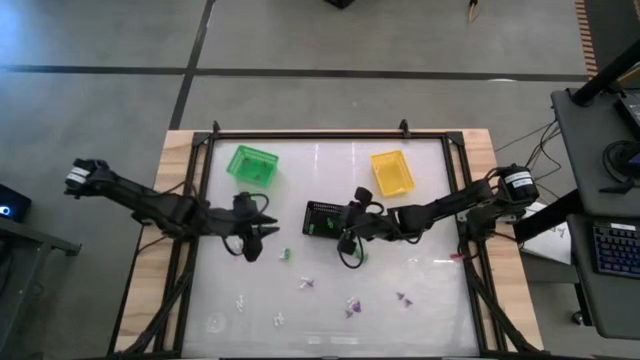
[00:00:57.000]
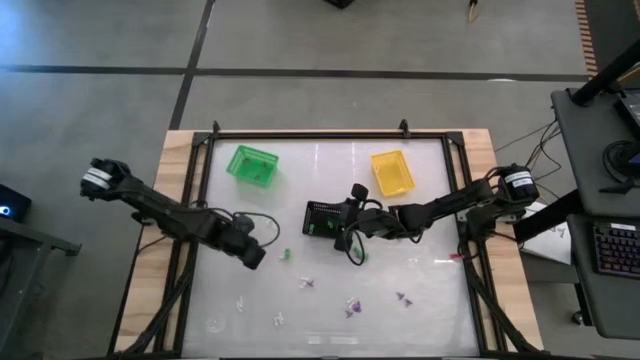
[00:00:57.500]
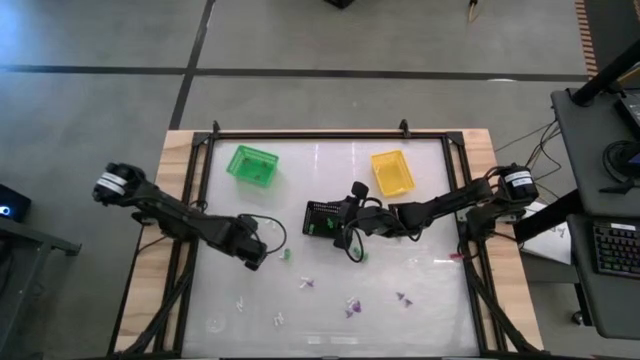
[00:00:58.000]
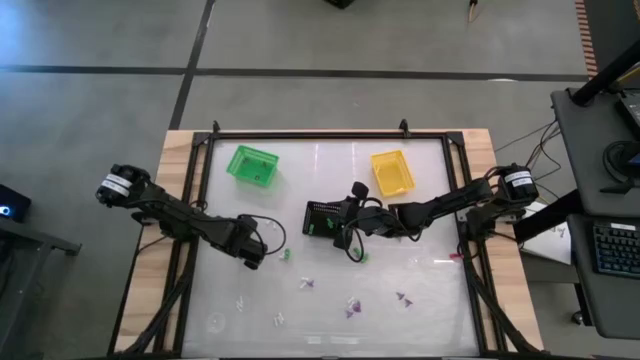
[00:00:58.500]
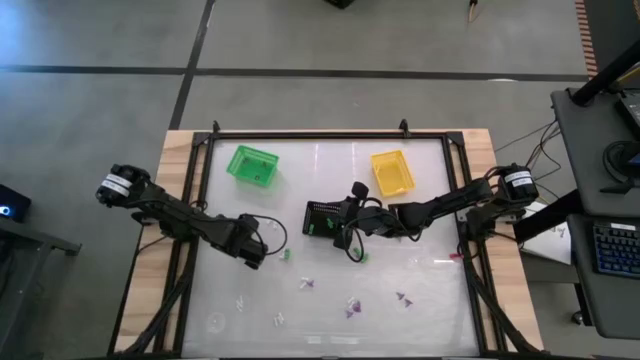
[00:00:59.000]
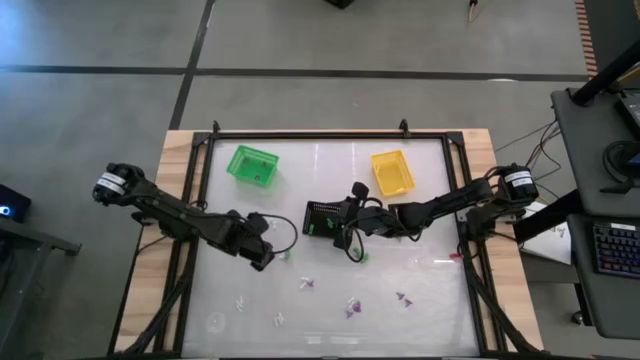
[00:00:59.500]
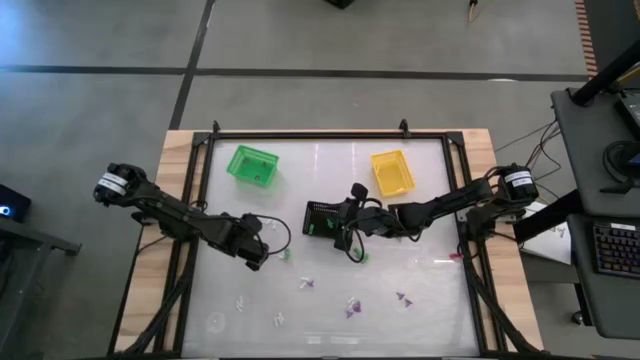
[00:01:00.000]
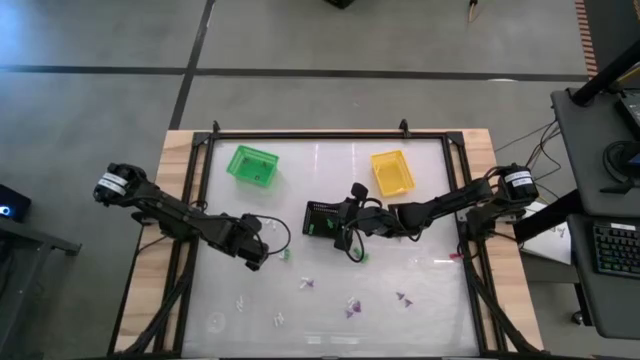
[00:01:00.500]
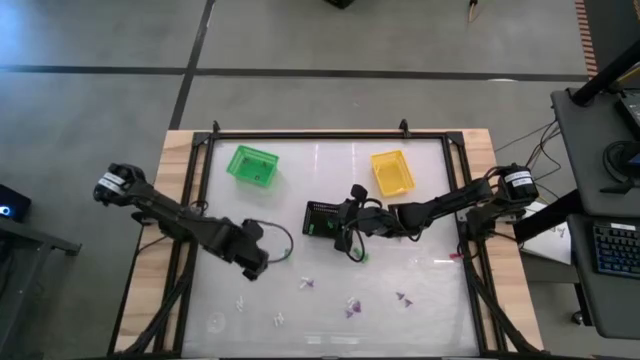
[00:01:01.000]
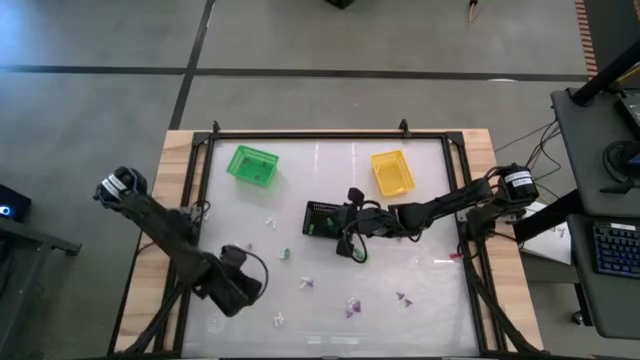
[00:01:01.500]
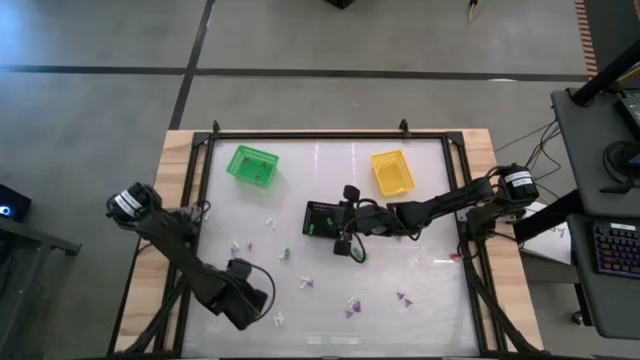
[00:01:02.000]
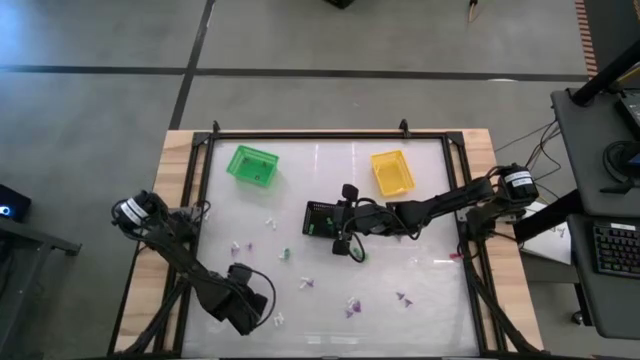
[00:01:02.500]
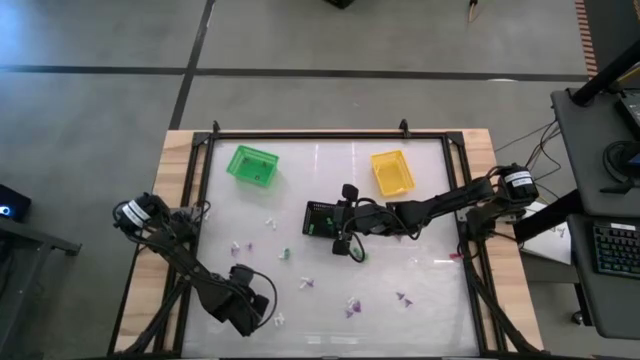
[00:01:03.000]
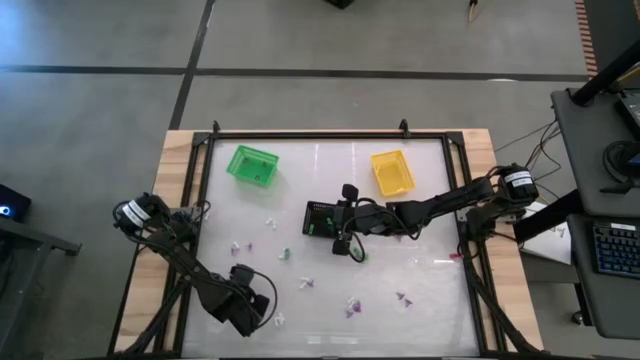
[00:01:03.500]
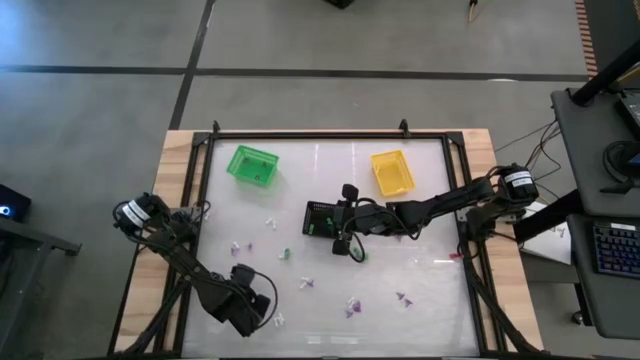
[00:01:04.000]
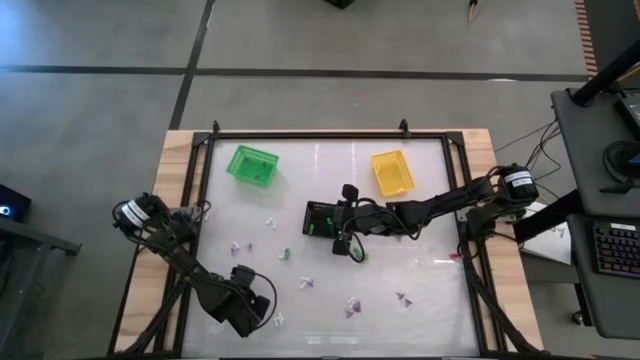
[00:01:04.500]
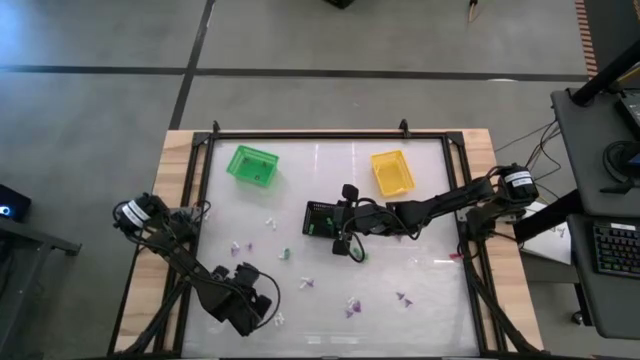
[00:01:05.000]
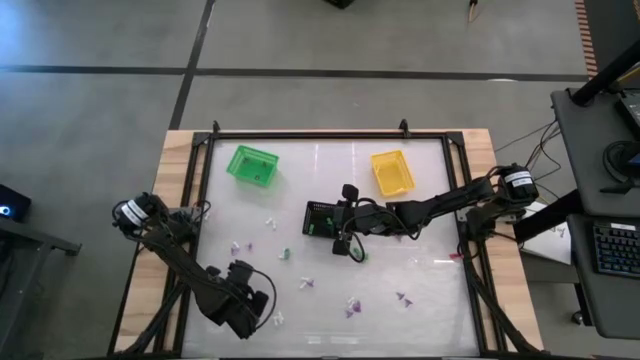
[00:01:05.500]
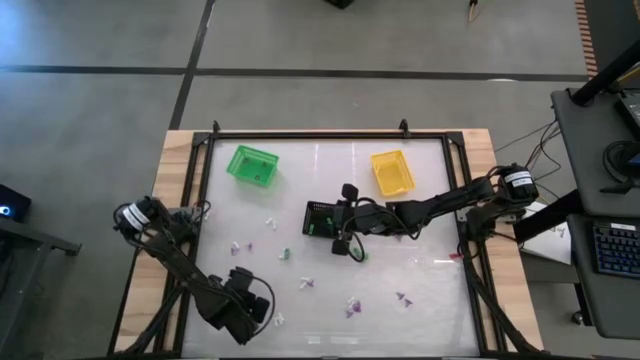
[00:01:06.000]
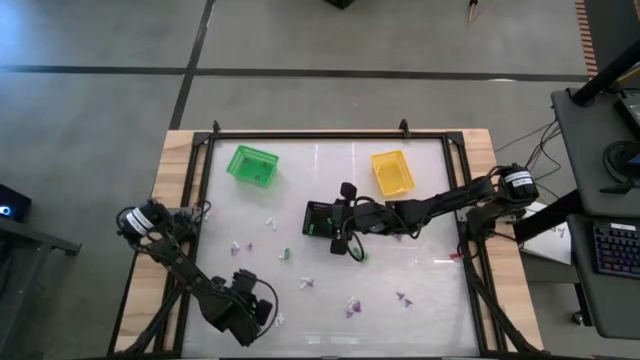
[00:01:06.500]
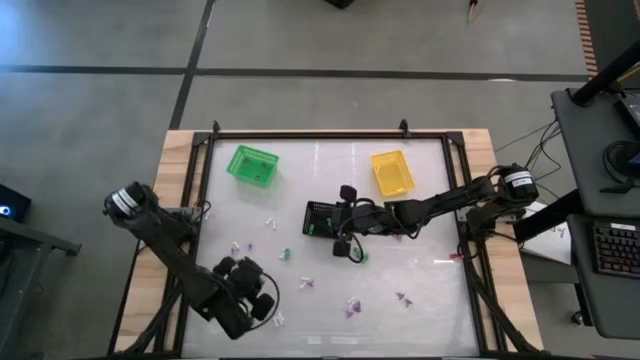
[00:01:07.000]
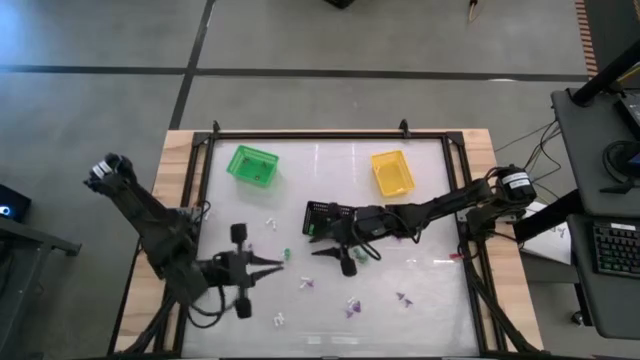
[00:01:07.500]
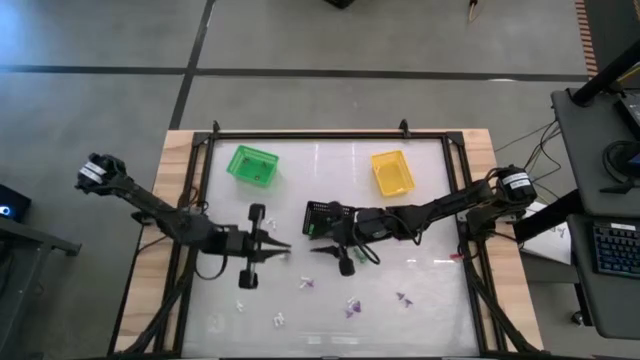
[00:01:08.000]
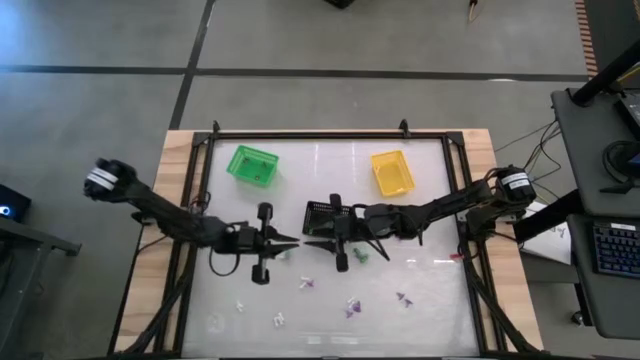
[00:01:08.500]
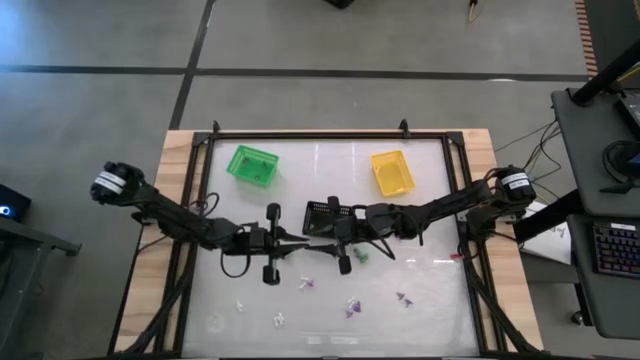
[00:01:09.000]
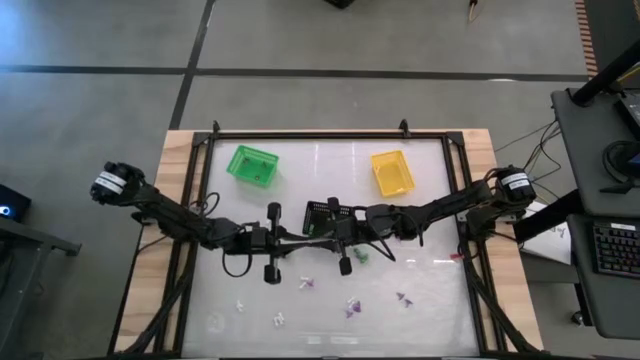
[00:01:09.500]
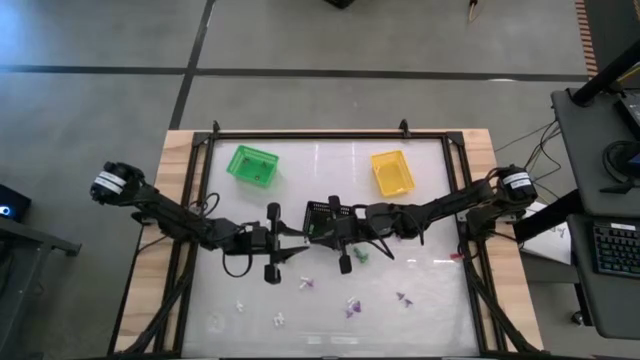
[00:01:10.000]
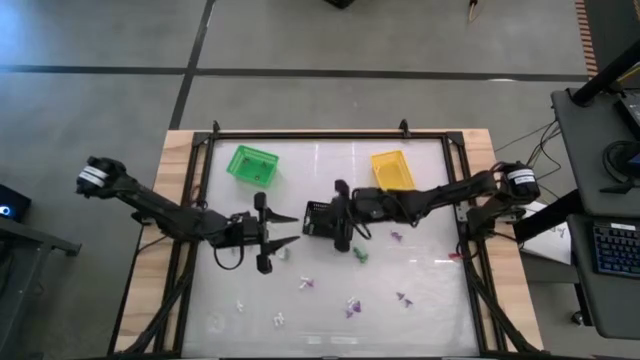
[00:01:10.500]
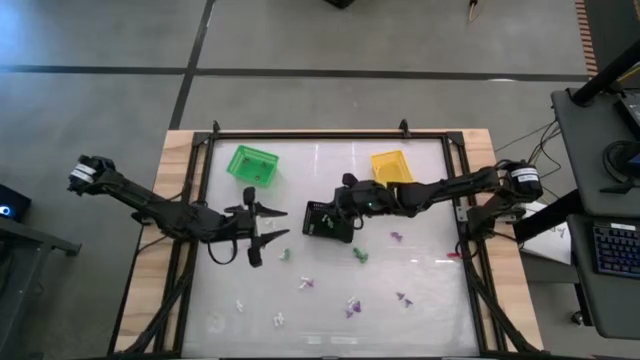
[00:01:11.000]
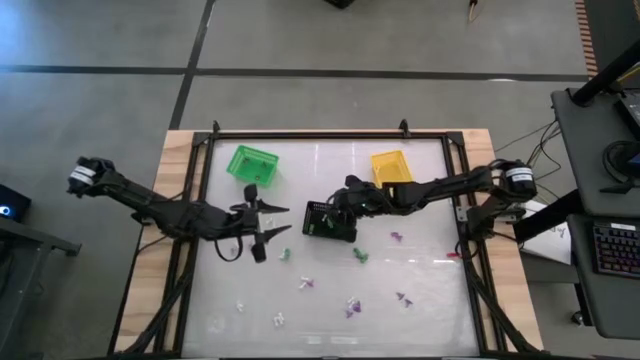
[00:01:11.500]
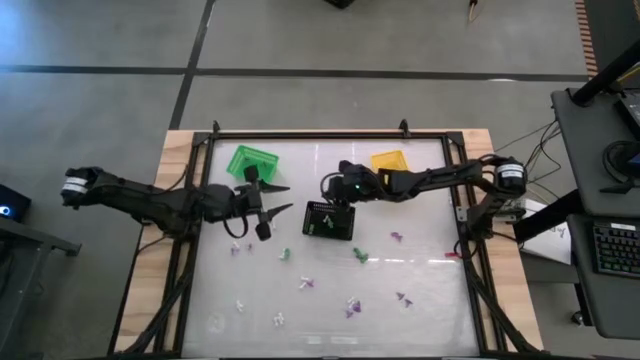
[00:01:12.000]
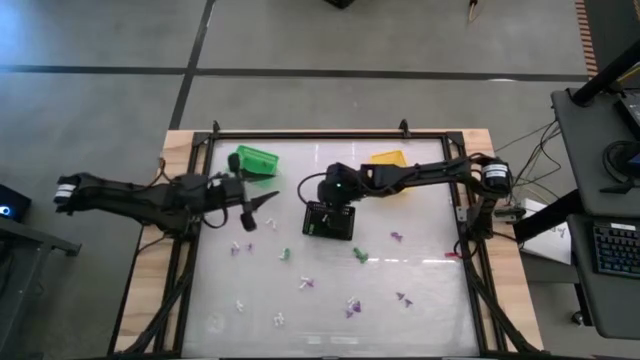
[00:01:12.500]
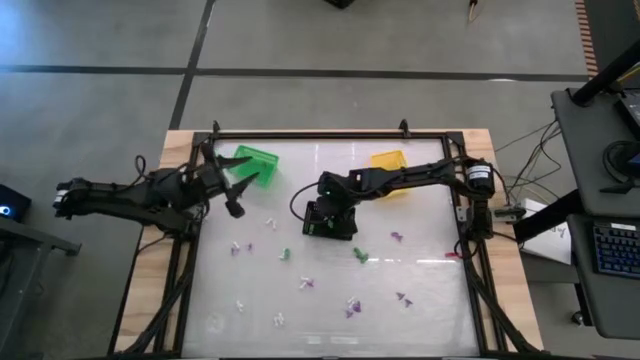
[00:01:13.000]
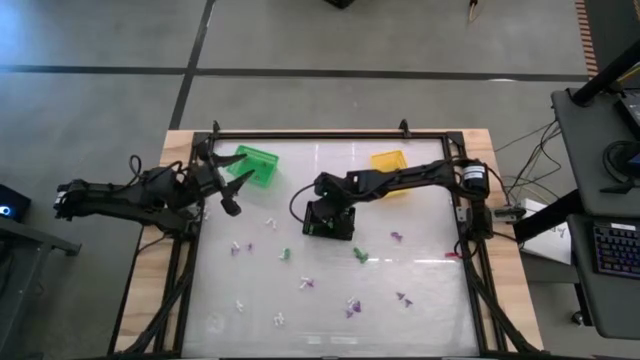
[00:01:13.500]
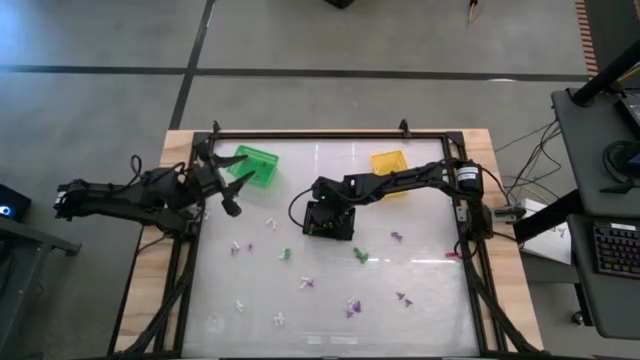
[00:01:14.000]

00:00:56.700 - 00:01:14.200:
Task: Sort Halloween decoration
Put the white bone toy into the yellow bin
